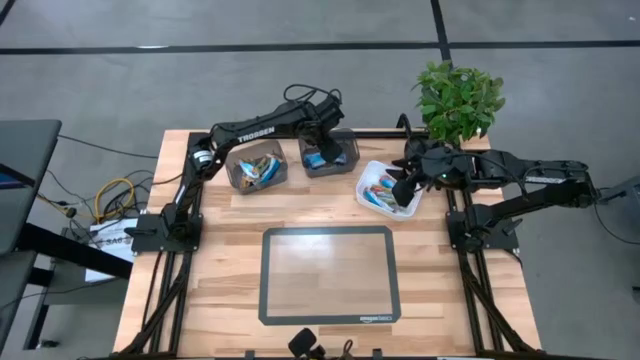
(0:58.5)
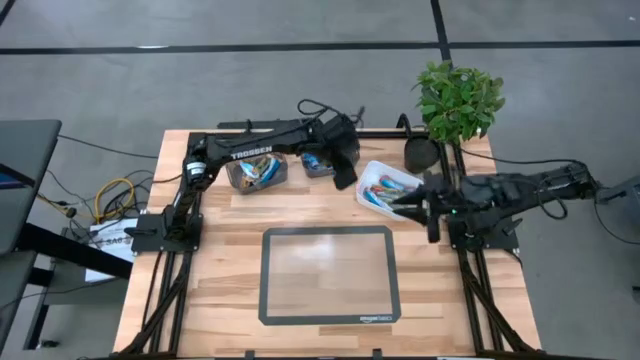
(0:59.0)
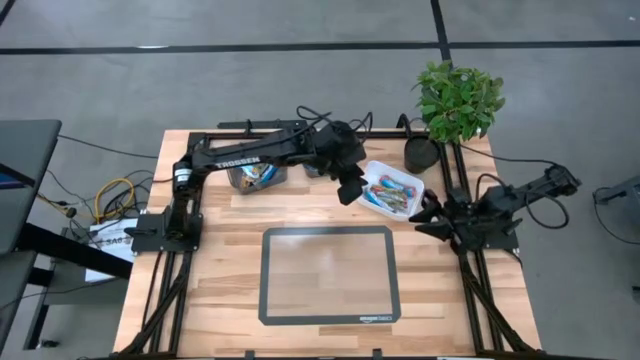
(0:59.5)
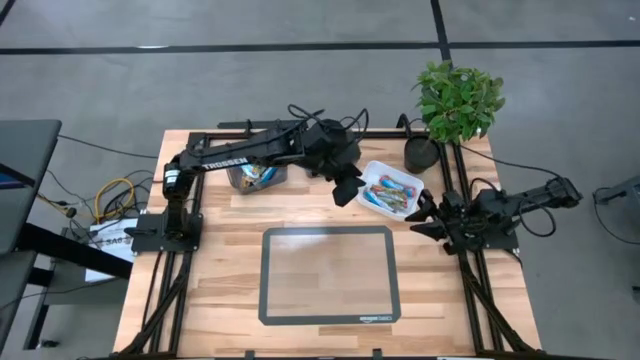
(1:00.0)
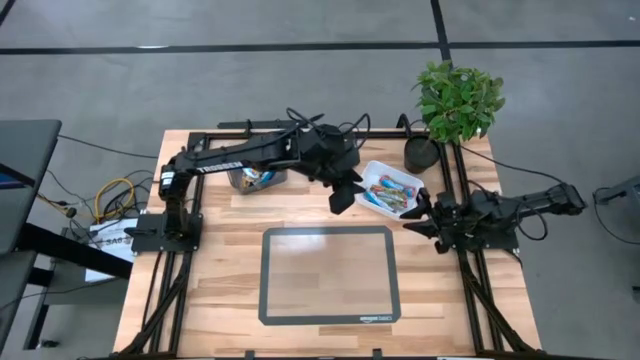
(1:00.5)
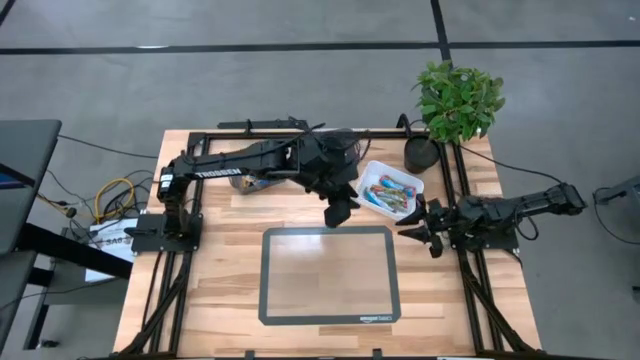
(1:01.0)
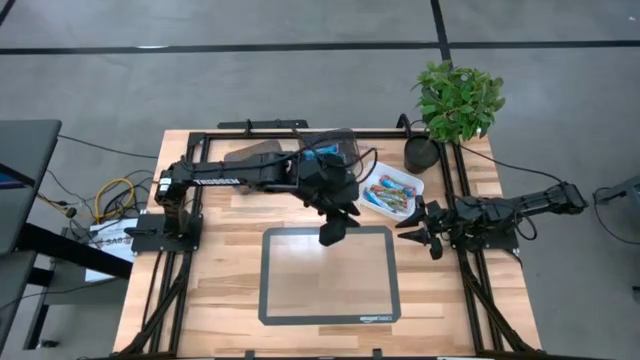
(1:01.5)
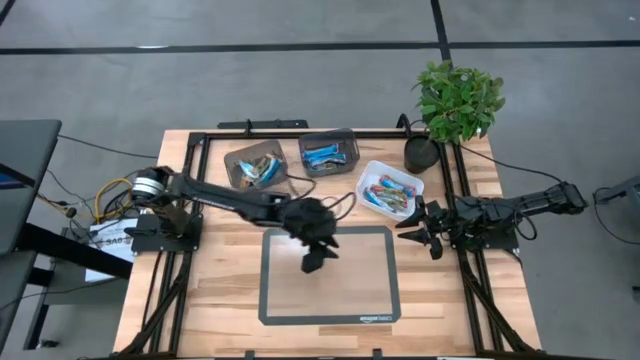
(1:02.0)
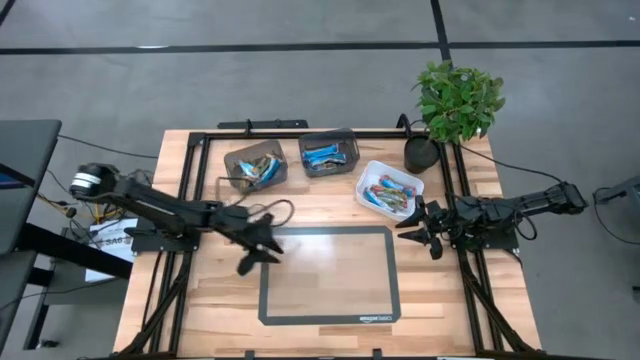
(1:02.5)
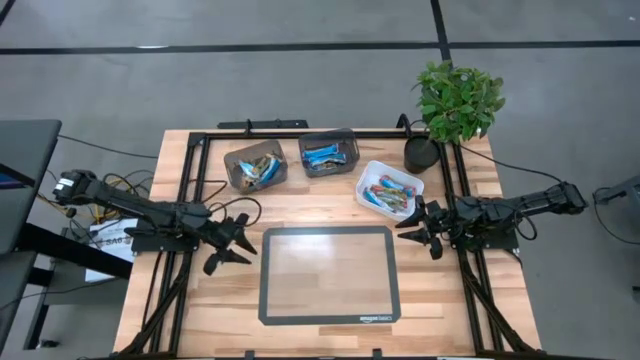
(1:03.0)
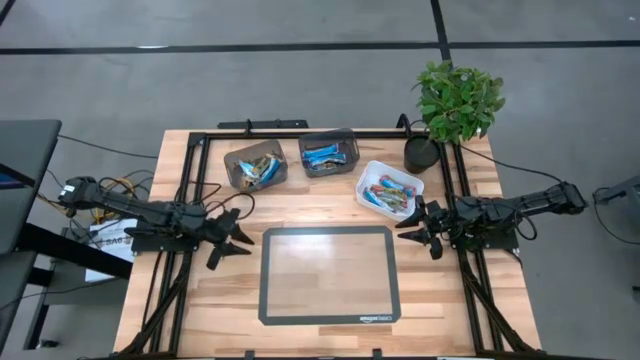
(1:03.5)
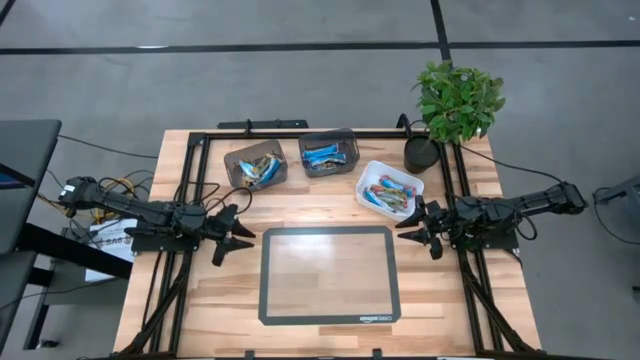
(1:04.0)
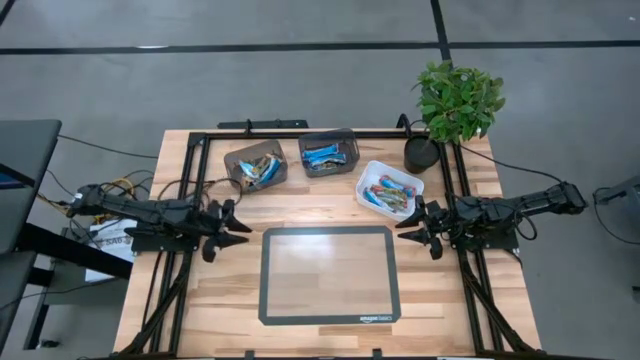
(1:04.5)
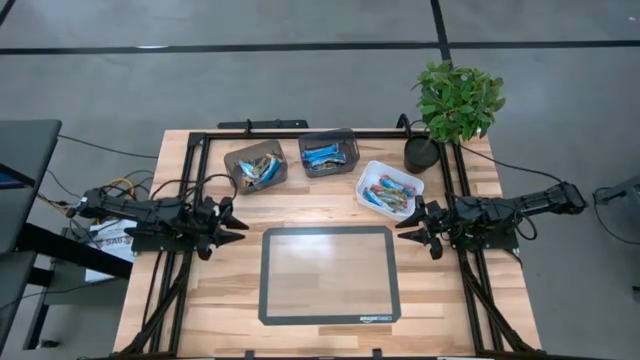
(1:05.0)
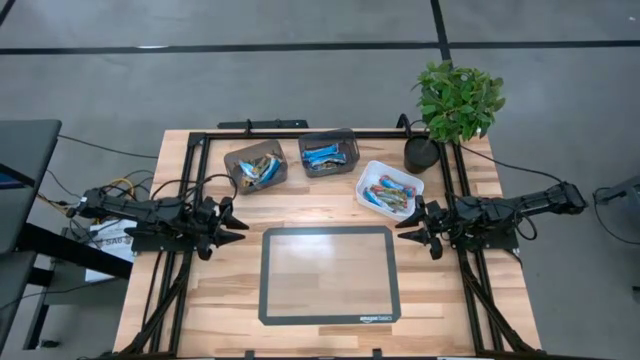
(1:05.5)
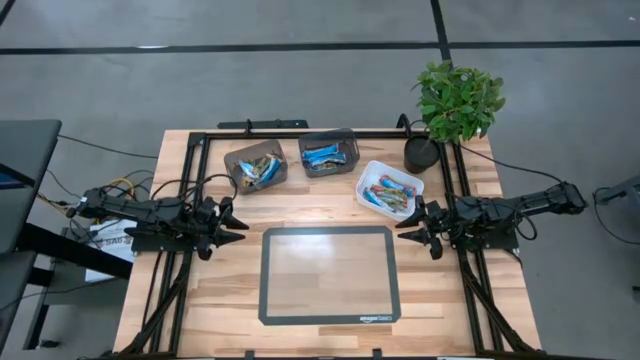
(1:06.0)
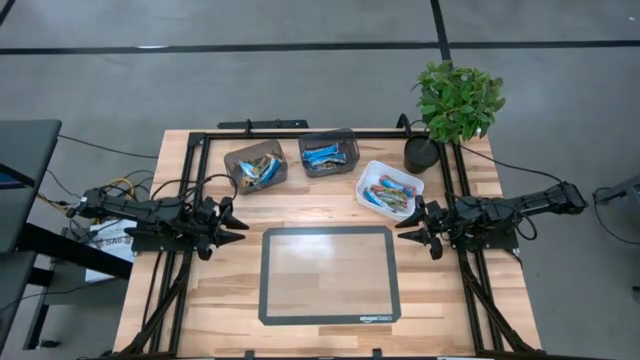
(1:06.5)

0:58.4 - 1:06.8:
Task: Pick and place Granola Bars by type
Return to Home Position

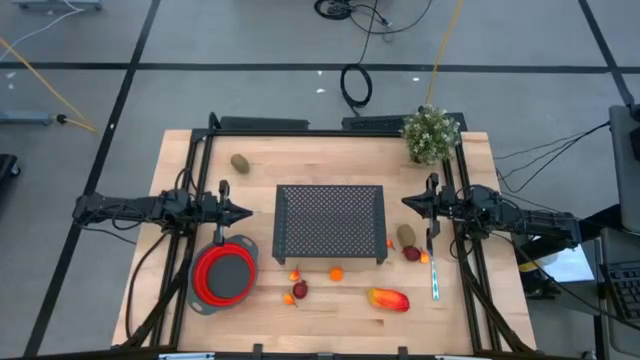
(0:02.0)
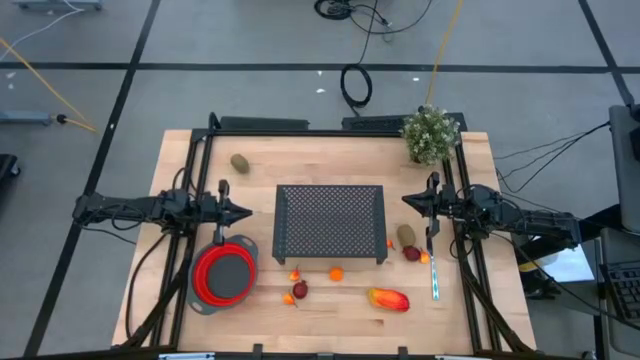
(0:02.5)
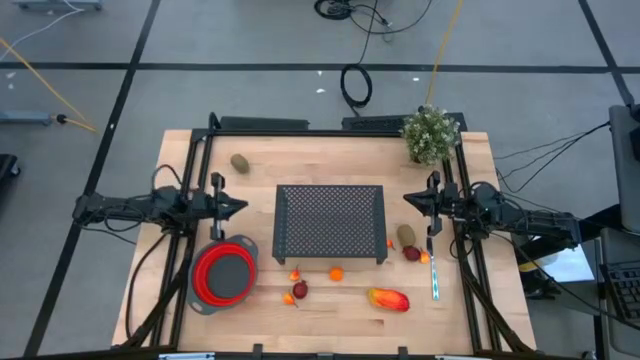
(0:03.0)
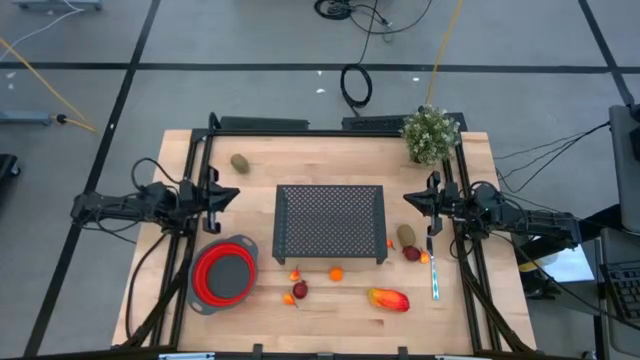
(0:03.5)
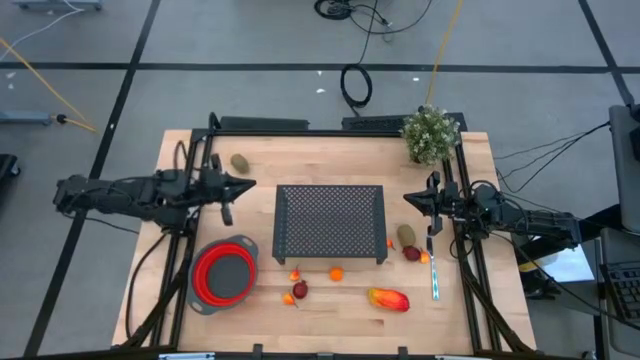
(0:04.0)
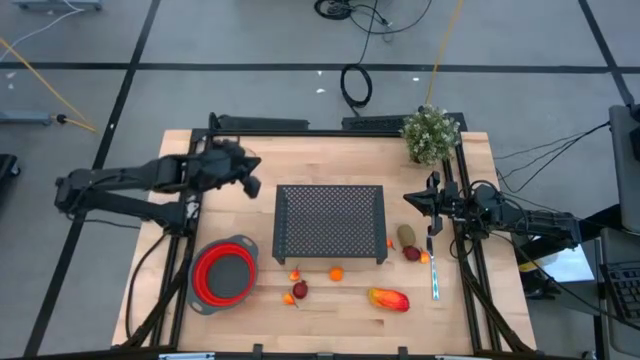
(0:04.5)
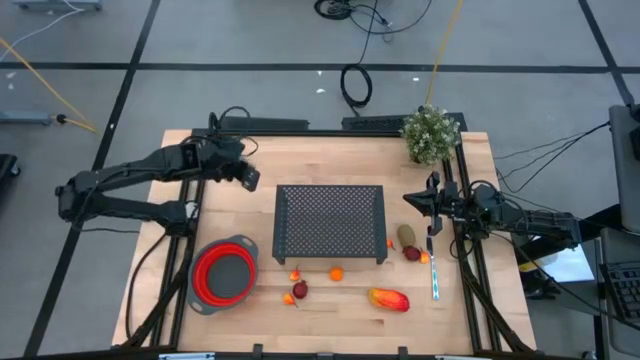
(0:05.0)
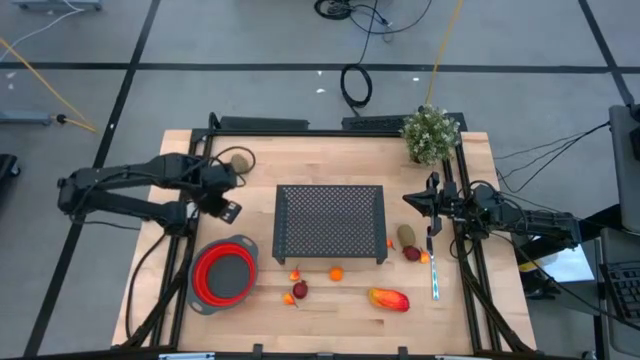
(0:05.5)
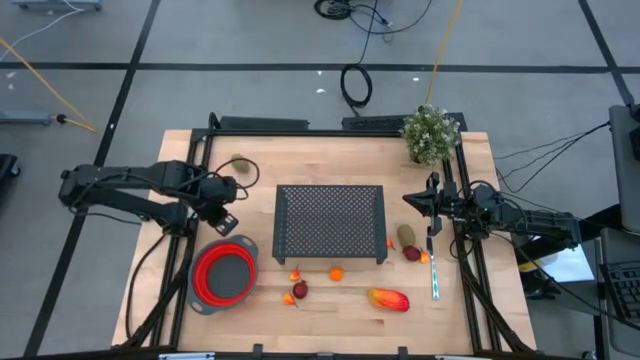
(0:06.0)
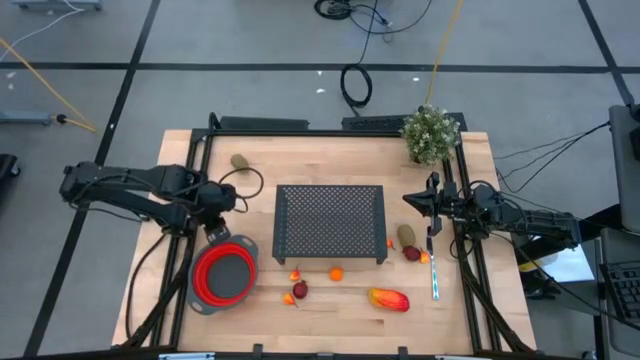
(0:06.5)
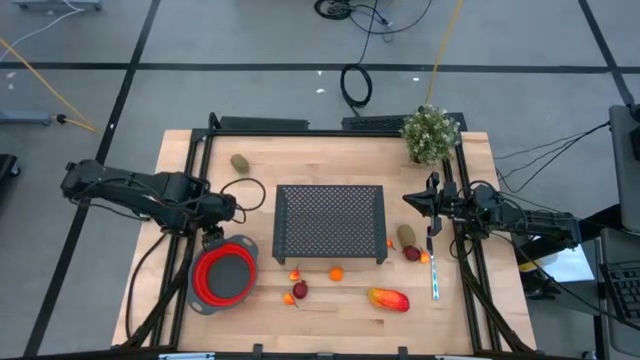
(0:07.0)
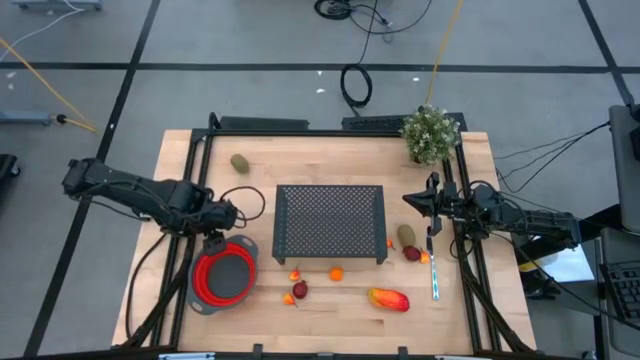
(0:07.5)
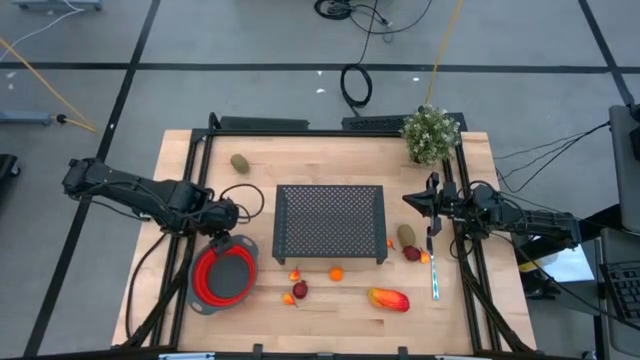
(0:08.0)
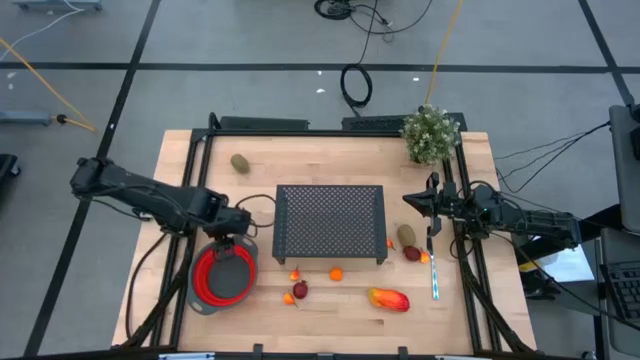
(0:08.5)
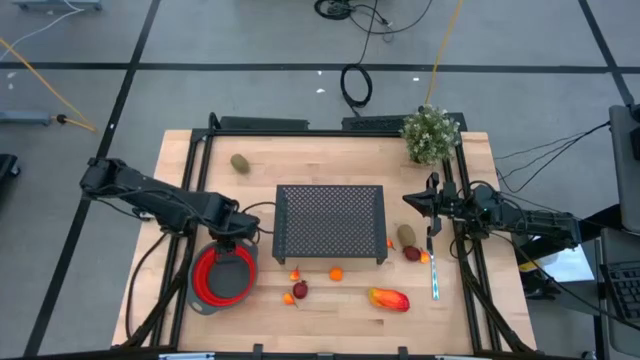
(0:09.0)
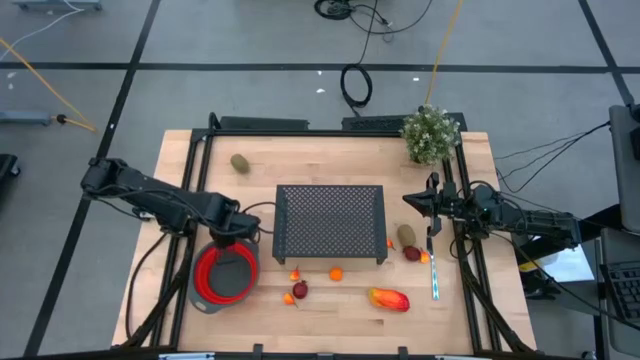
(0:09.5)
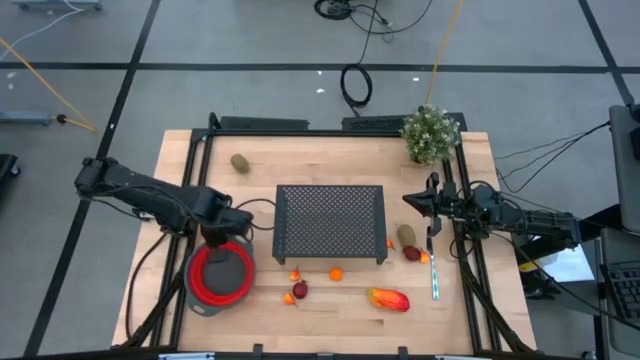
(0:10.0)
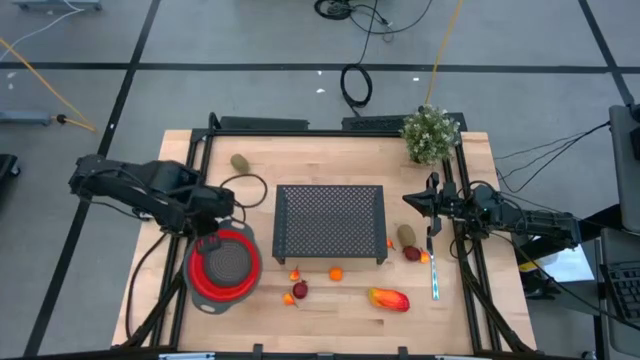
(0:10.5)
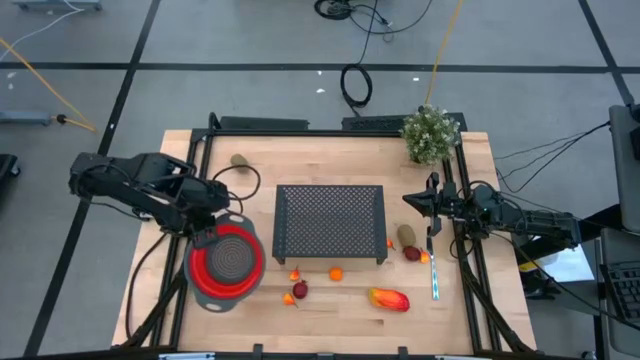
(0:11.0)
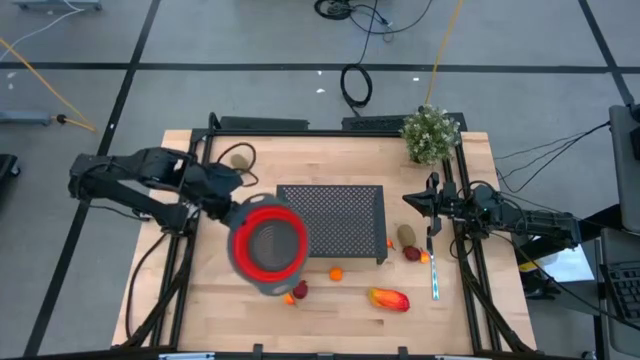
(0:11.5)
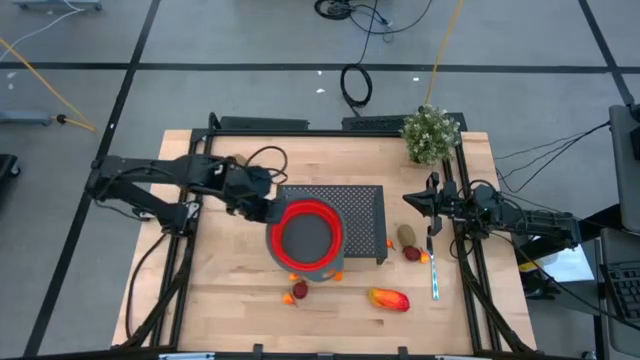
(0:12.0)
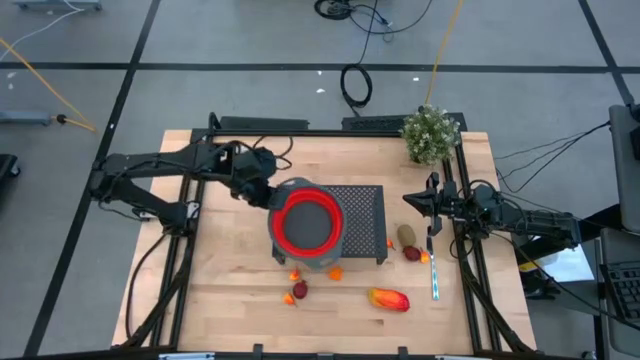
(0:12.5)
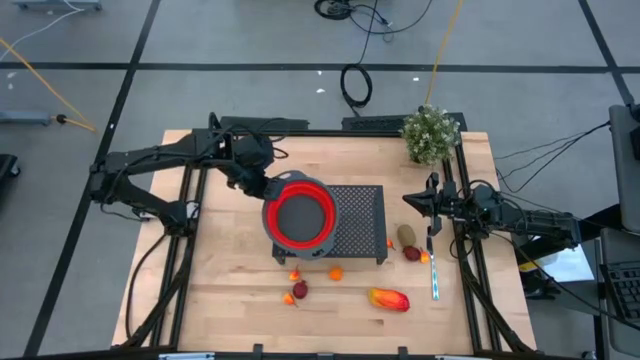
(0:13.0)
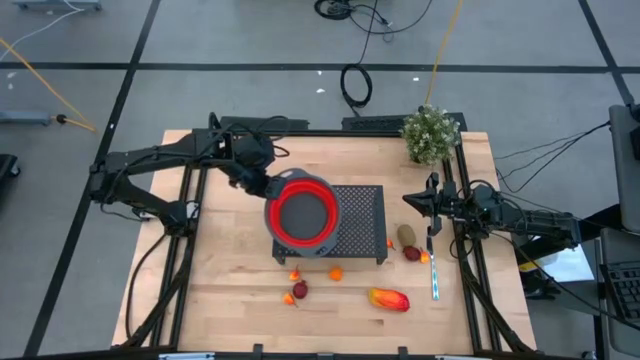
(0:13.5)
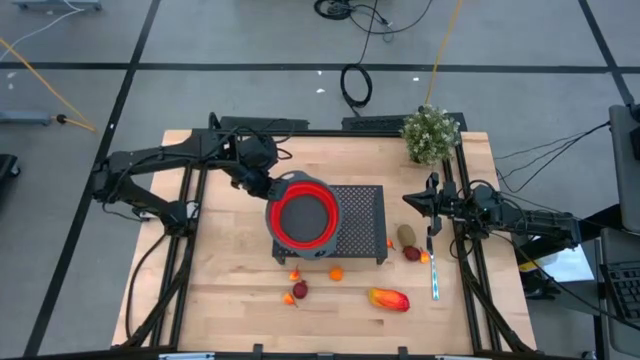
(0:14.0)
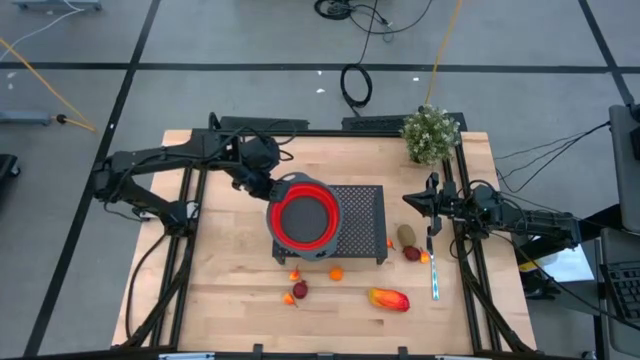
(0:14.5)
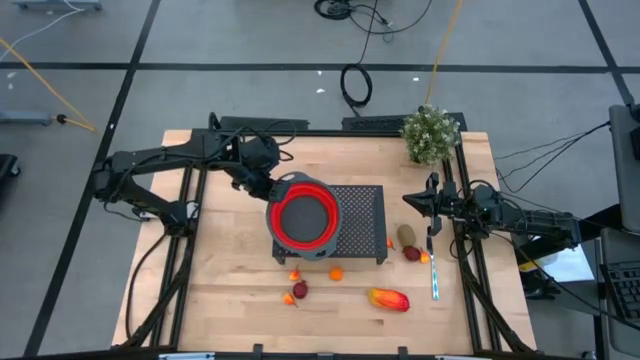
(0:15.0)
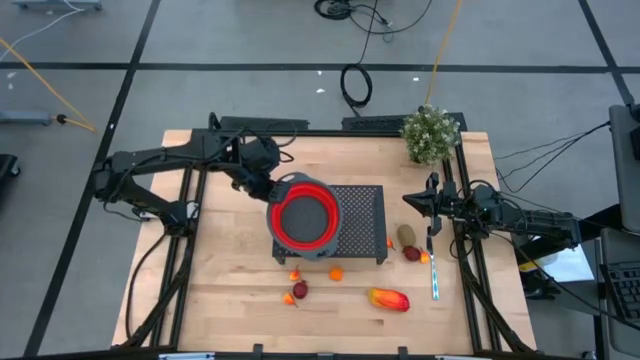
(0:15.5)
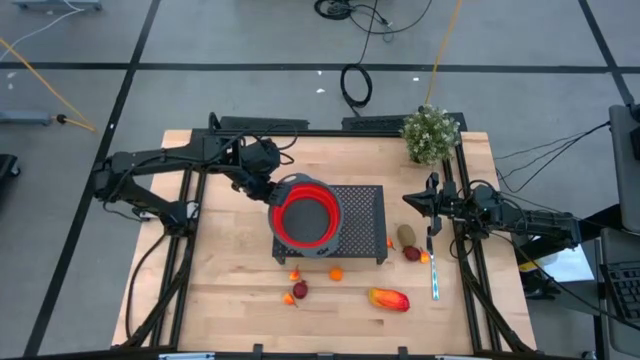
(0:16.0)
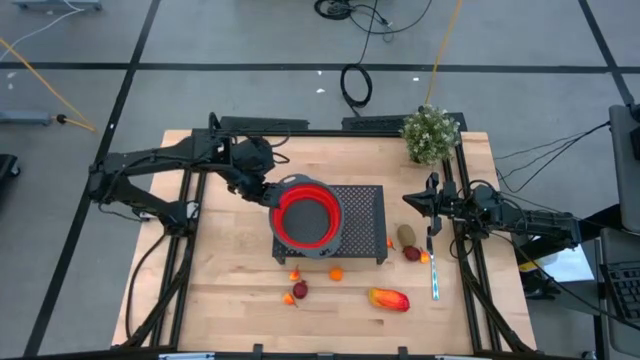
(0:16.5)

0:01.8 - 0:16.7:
Task: Pick & Place Fruit
Put the red colander on the shelf
